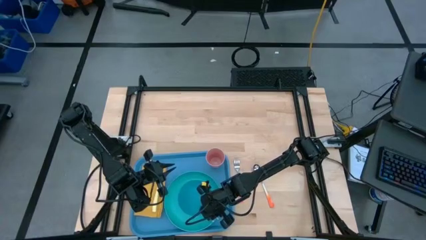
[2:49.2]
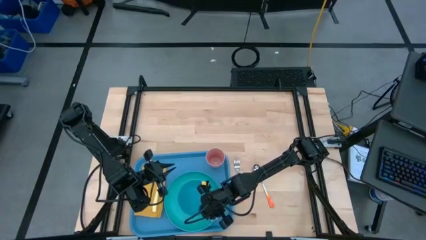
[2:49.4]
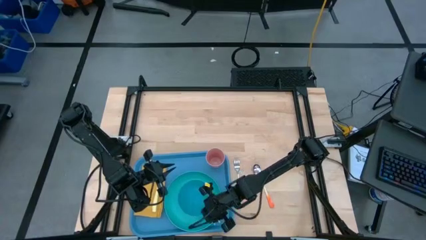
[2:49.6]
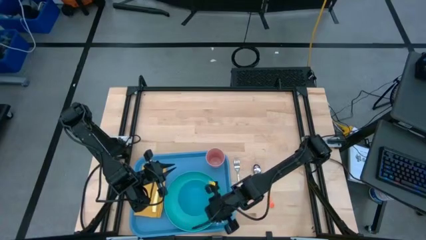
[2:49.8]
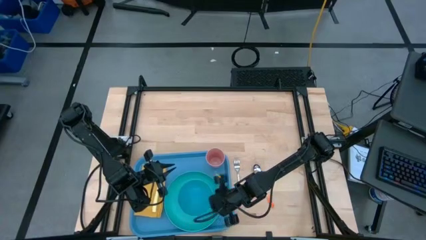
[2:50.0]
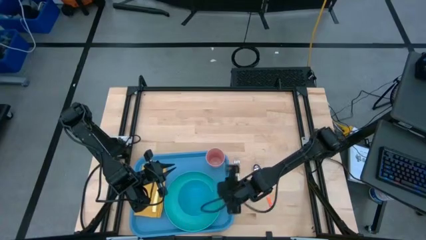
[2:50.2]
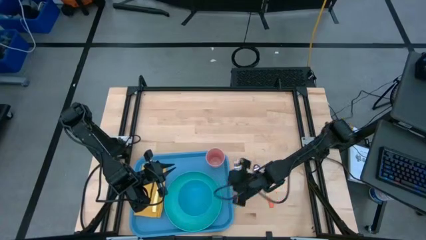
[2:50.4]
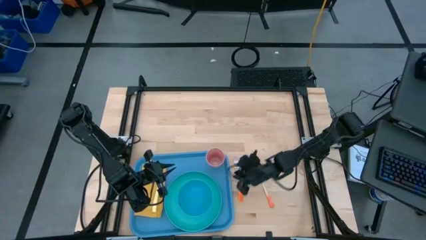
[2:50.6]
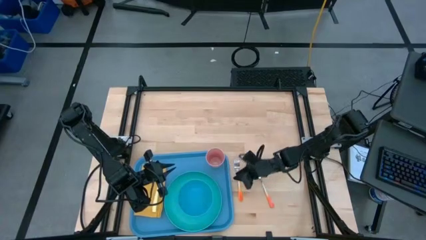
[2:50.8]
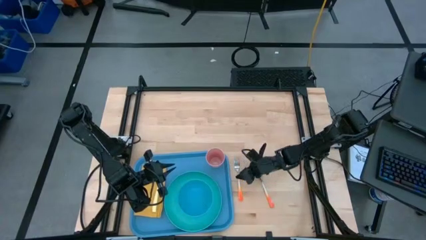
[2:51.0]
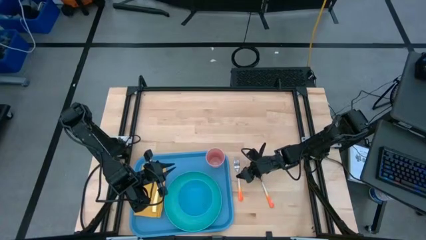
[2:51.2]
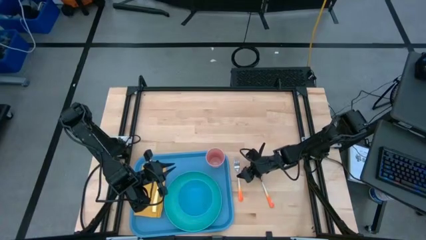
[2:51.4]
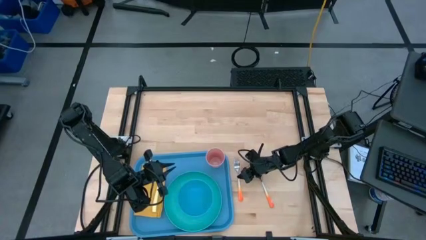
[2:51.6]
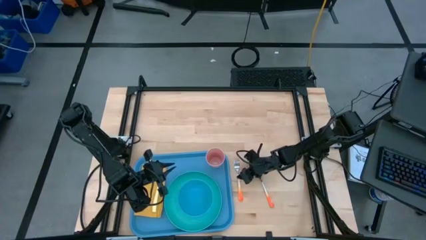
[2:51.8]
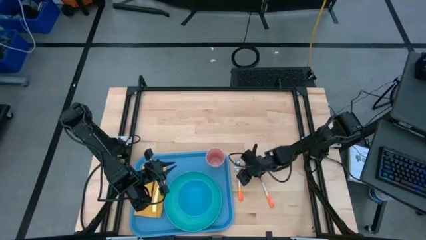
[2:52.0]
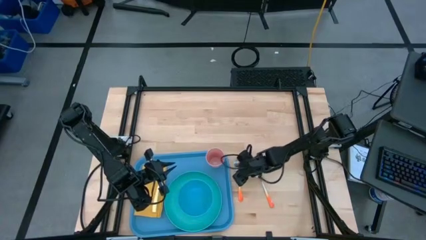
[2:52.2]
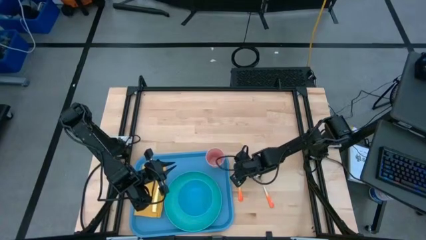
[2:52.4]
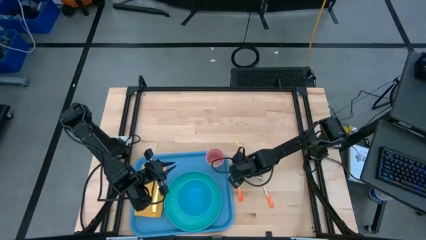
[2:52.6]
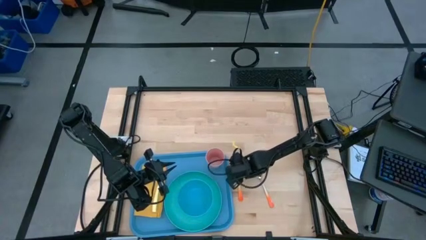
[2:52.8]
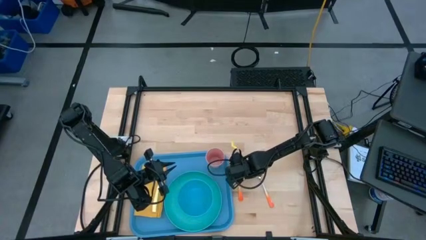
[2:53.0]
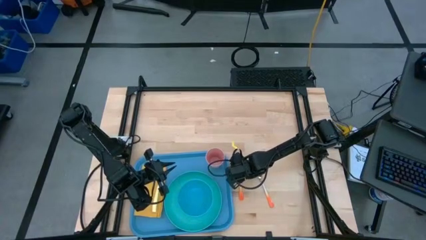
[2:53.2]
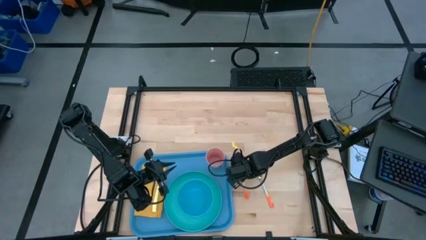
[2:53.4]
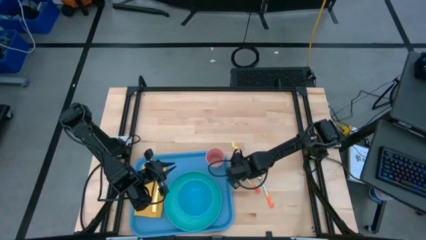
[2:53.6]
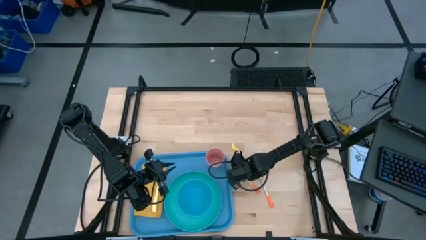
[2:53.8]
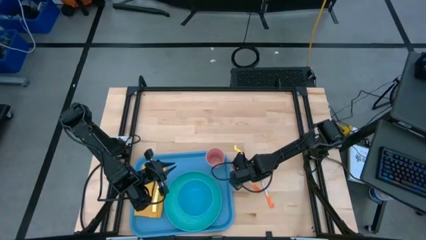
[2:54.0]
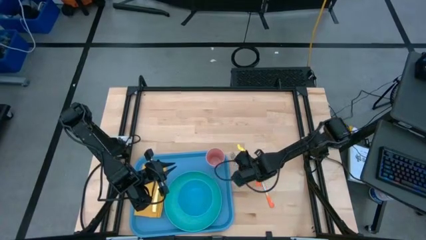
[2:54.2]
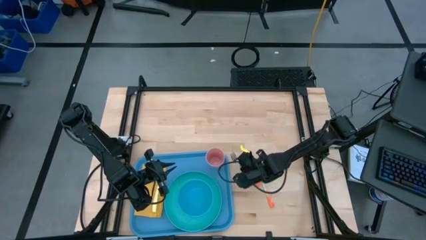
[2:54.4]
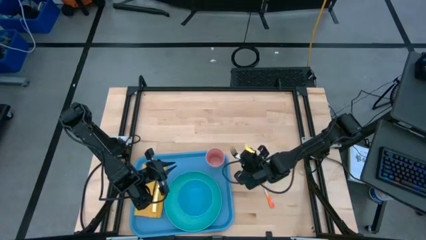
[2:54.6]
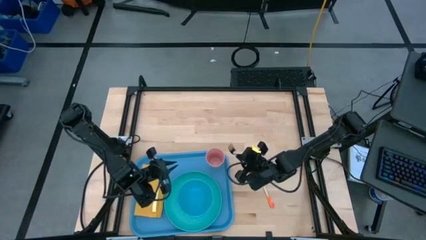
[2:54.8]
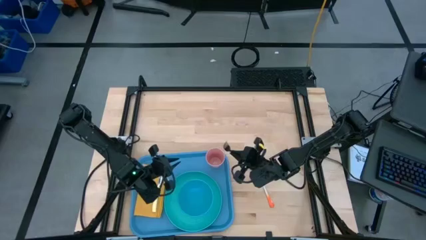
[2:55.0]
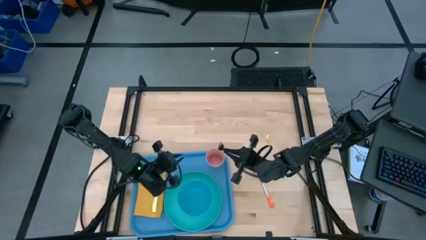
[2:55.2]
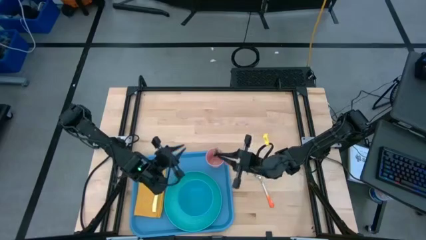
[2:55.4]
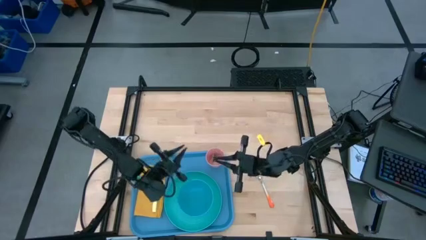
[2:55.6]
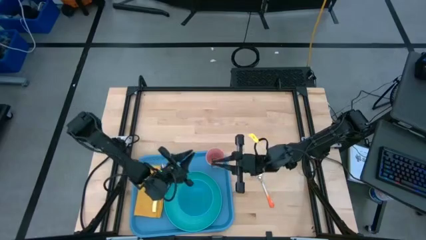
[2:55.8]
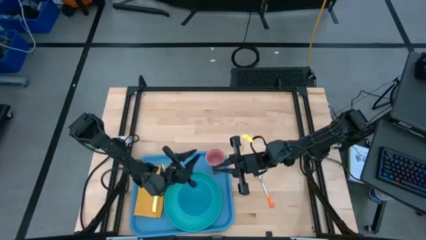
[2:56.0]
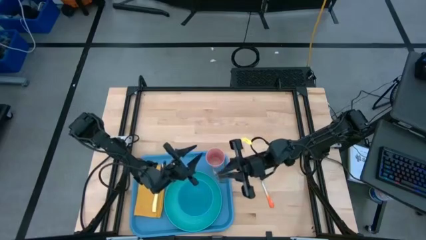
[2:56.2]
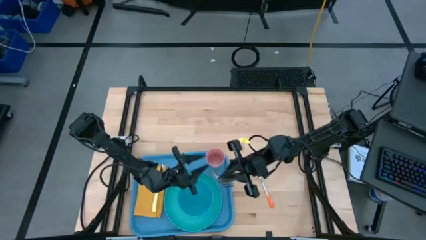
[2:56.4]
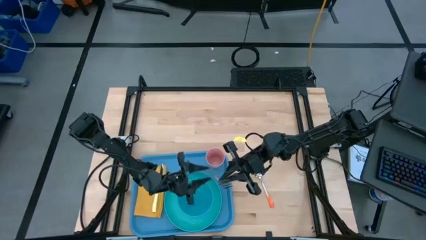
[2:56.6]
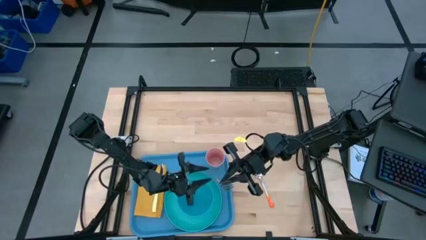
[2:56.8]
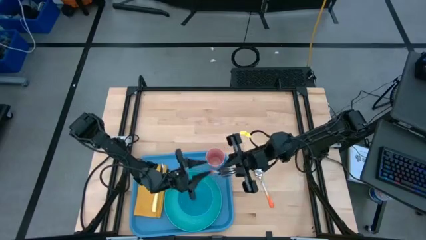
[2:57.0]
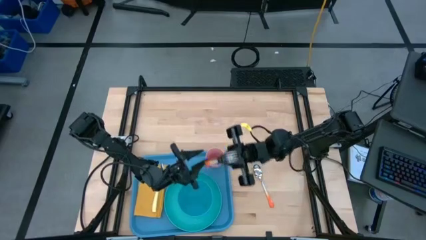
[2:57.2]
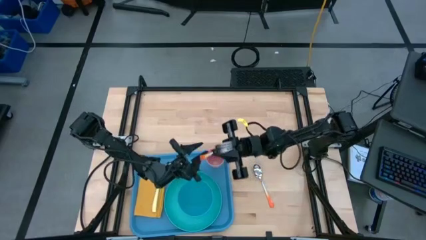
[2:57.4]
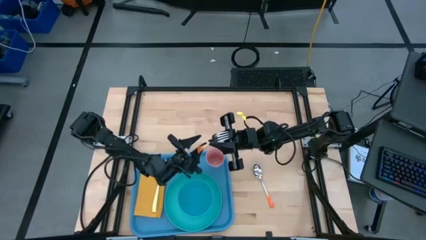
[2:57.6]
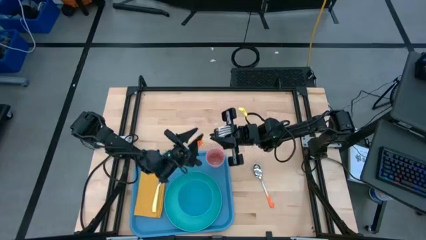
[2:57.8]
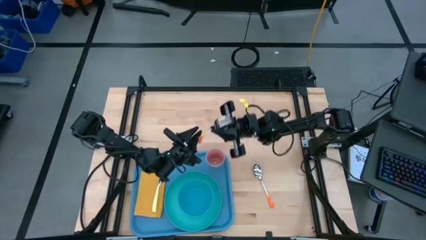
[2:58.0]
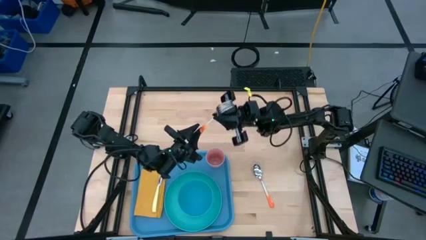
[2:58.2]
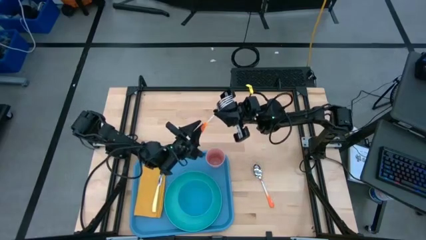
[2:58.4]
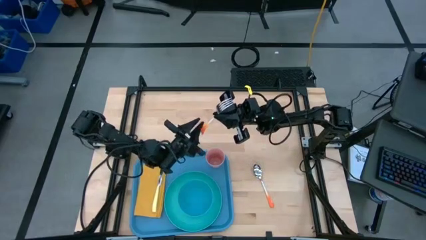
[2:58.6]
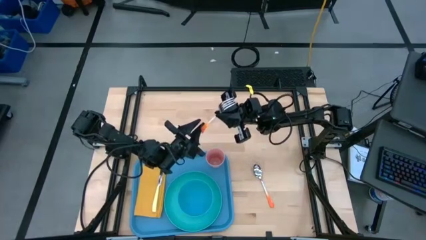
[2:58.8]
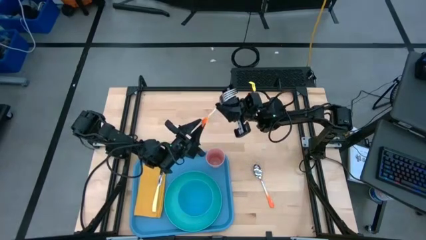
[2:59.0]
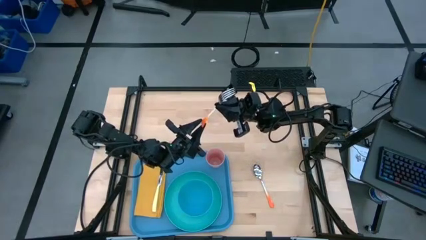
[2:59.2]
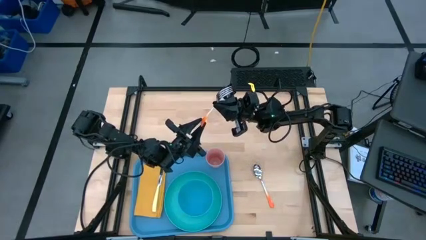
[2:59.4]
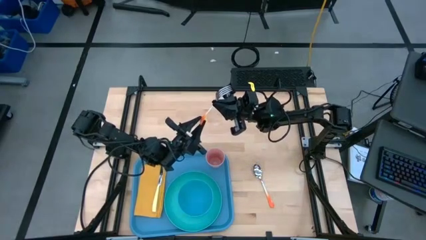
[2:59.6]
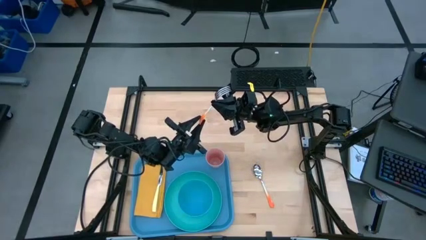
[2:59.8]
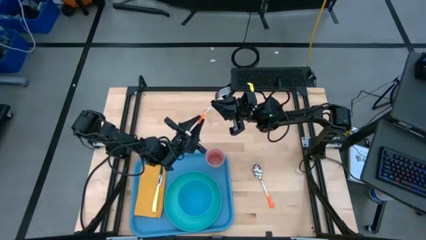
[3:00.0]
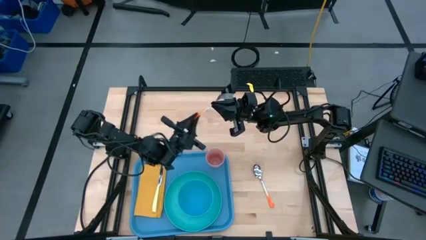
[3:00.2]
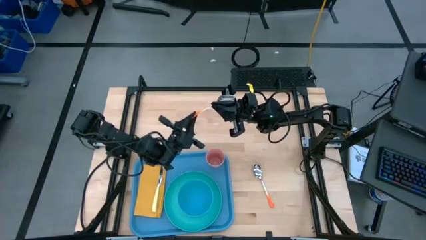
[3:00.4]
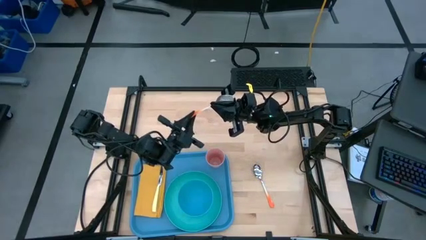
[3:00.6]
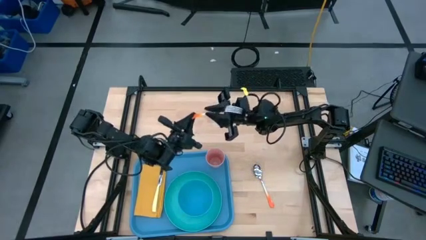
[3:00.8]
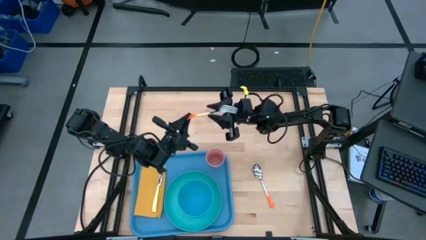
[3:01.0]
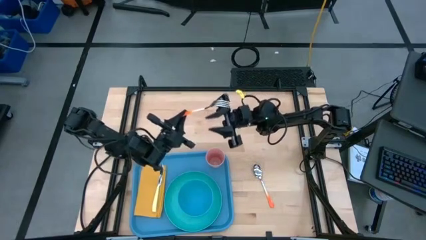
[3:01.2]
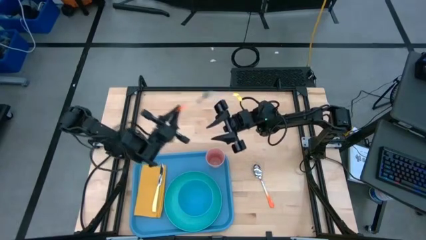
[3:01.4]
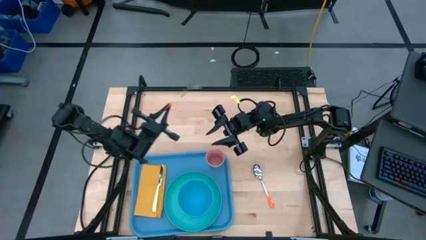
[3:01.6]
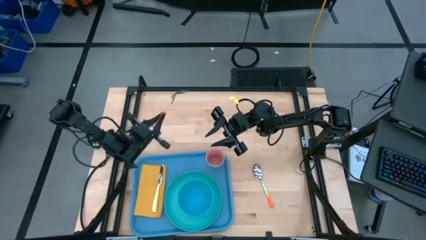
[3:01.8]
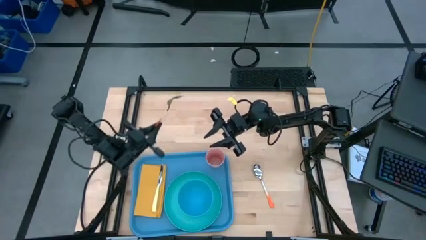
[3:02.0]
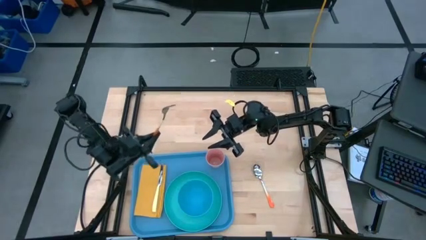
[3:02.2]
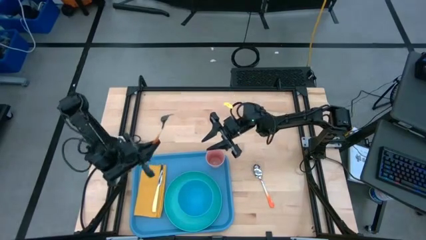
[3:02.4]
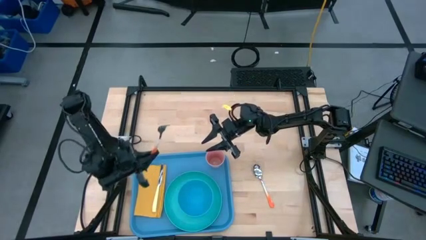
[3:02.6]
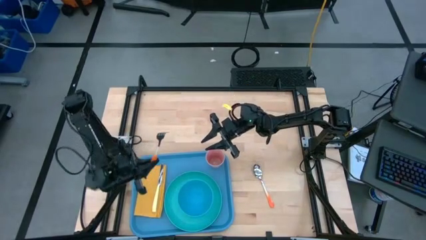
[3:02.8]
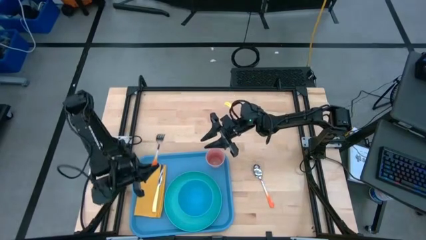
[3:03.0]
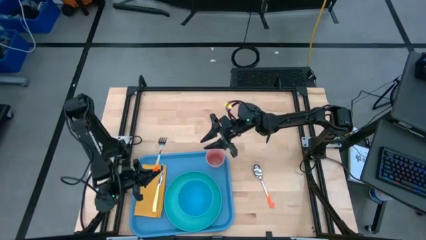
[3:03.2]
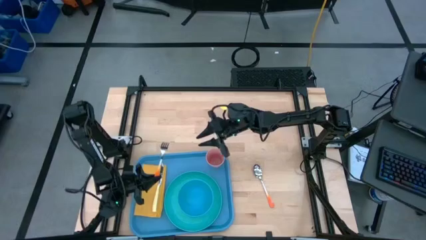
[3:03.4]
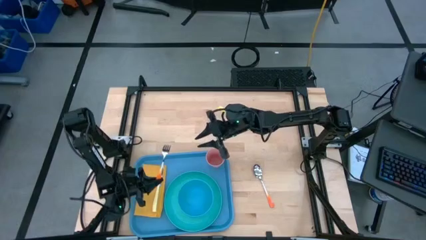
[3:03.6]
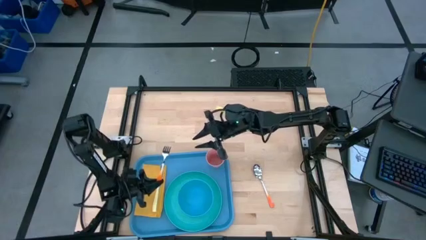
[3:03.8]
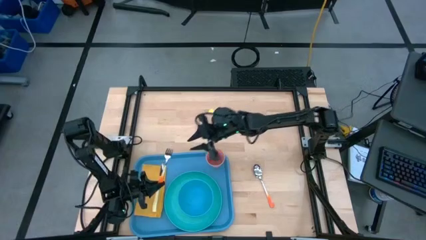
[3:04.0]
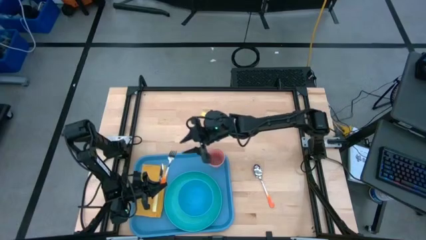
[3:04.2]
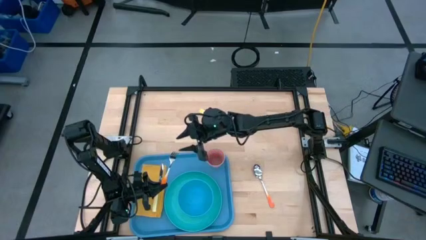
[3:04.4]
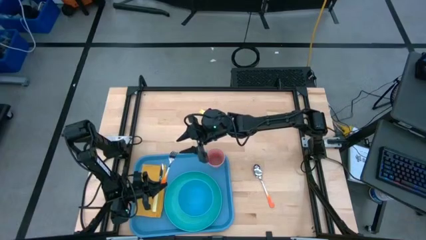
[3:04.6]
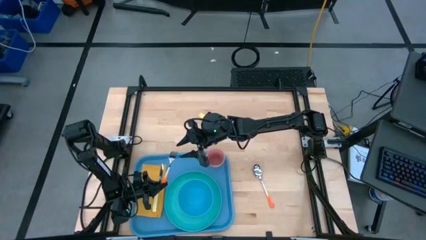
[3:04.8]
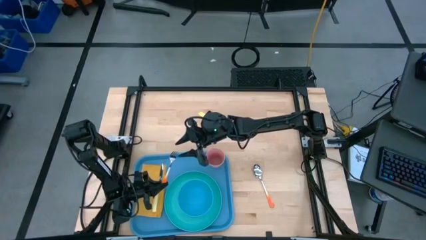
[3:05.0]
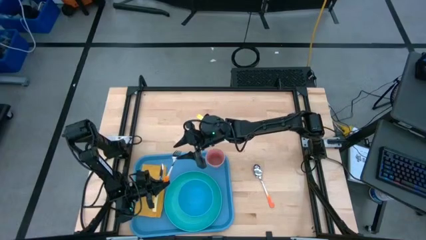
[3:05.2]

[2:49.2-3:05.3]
Task: Set up tray
Put the orange fork on top of the yellow table napkin to the left of the yellow table knife on the blue tray

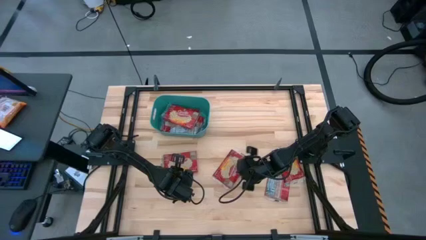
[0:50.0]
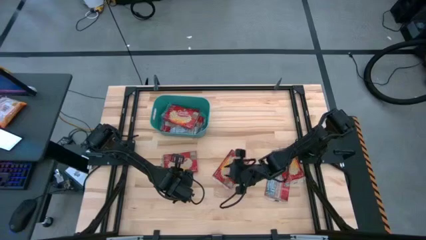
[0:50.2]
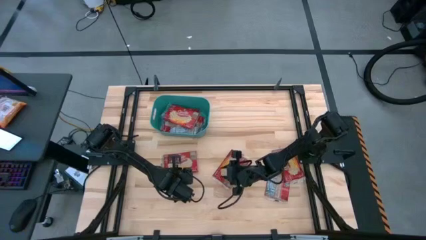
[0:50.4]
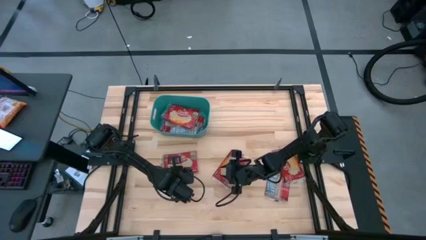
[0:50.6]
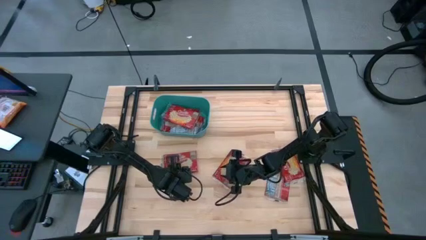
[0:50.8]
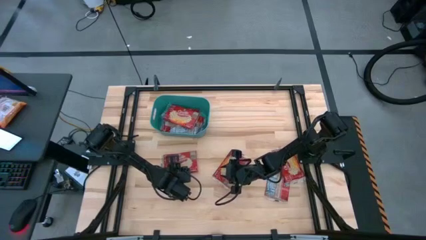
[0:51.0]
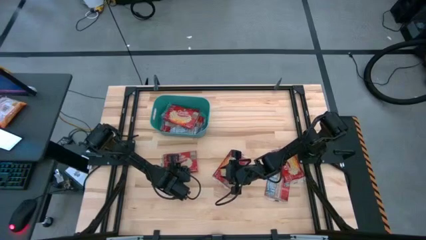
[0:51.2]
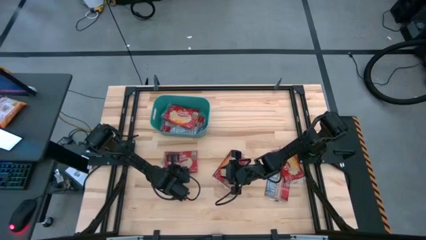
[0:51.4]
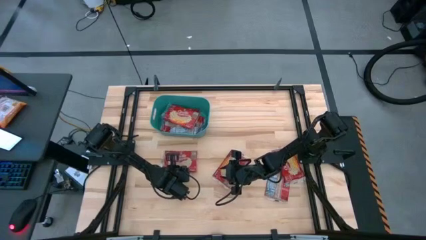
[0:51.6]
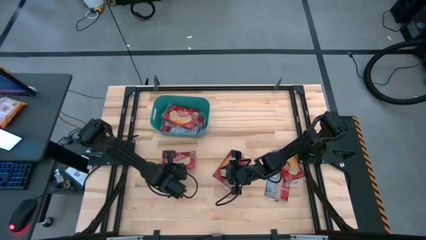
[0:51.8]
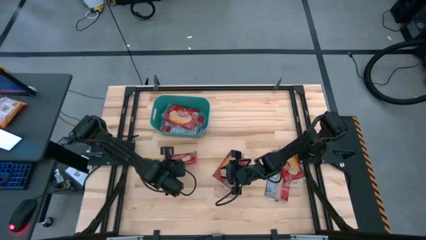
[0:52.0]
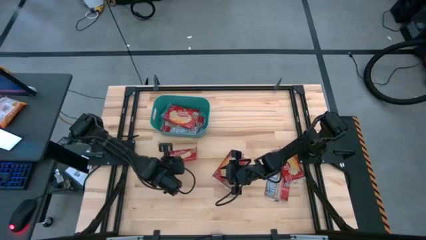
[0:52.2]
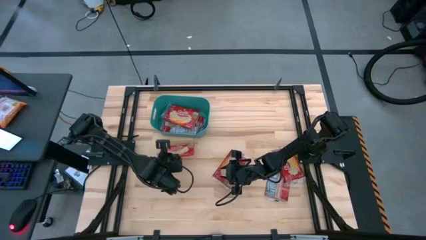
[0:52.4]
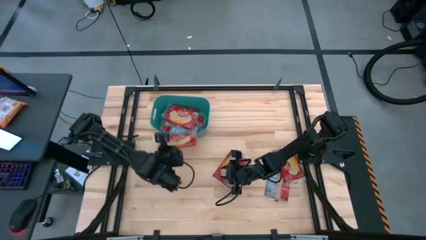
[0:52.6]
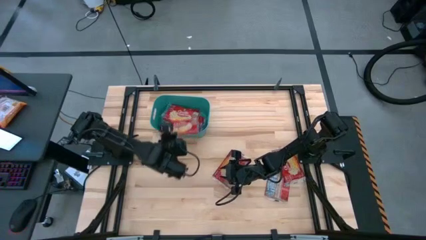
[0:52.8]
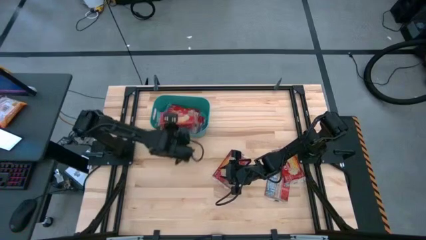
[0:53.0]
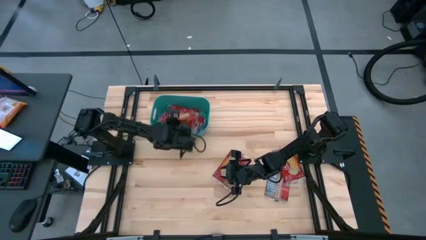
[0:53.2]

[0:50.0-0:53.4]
Task: Sort popcorn bags into baskets
Put the red popcorn pack into the green bin
